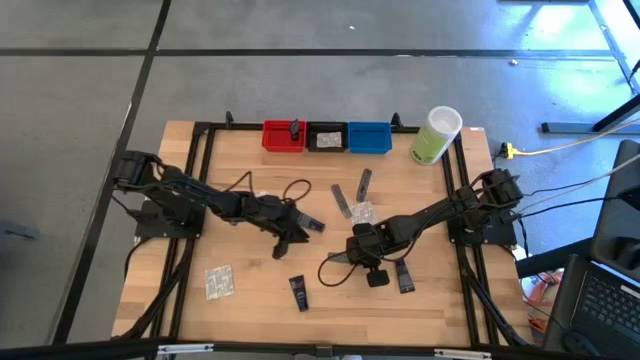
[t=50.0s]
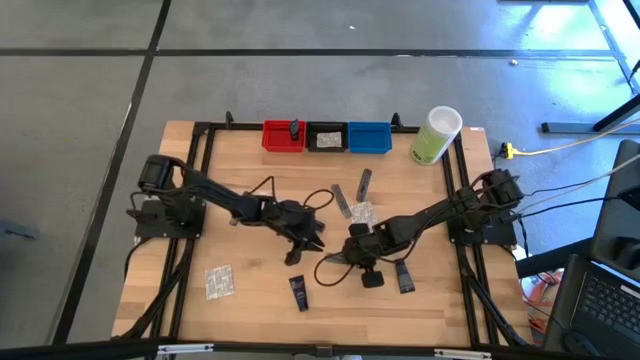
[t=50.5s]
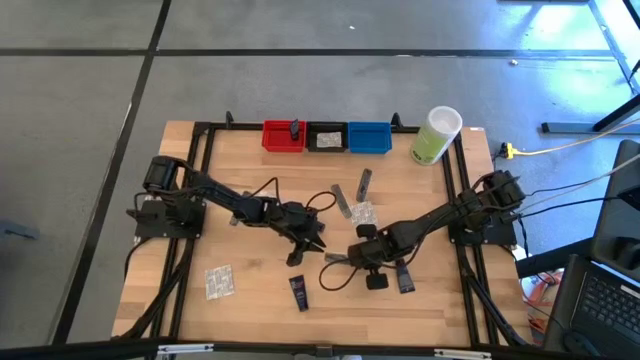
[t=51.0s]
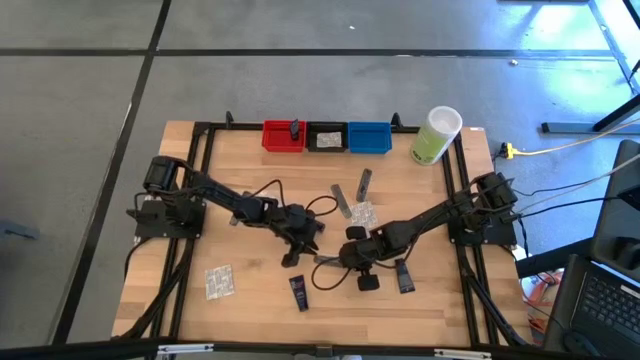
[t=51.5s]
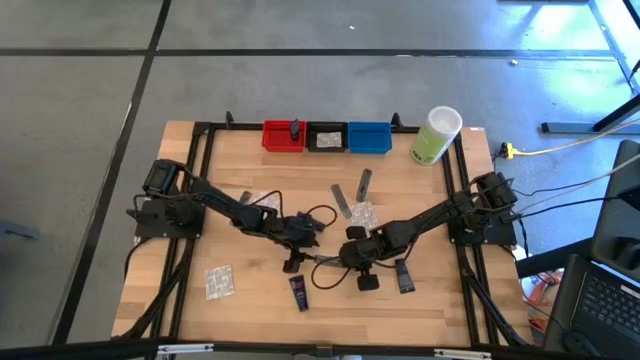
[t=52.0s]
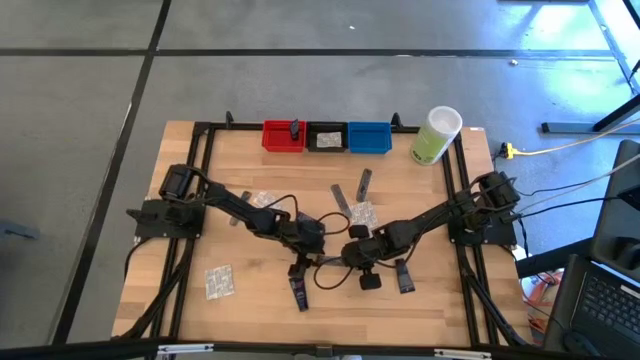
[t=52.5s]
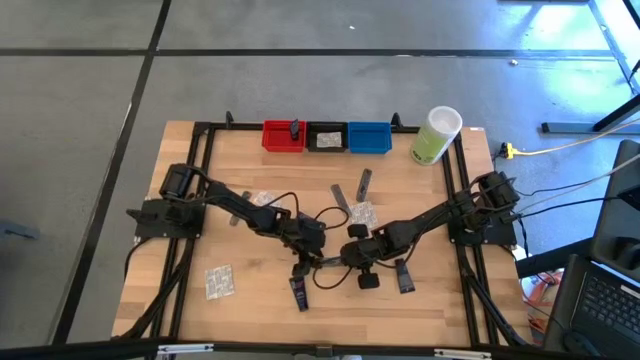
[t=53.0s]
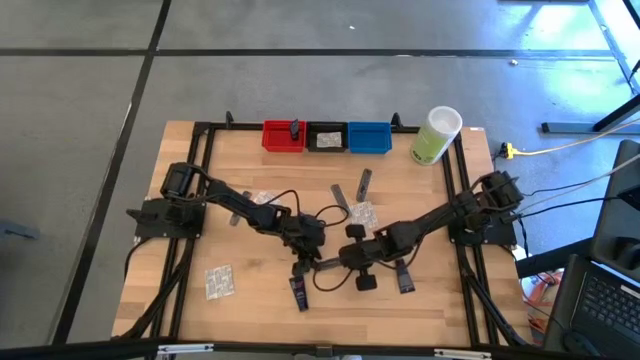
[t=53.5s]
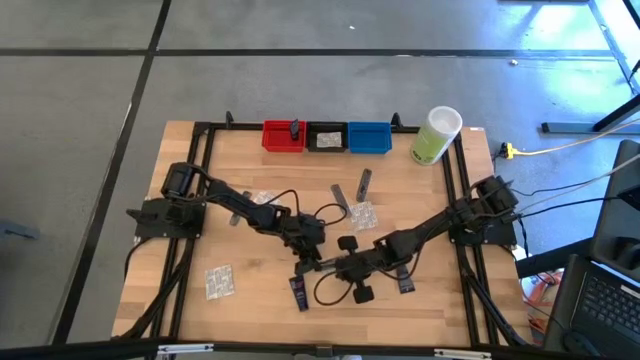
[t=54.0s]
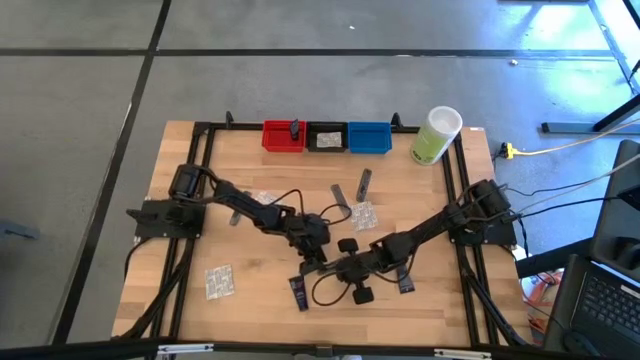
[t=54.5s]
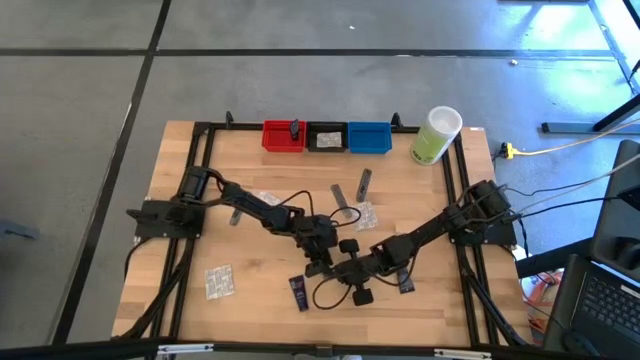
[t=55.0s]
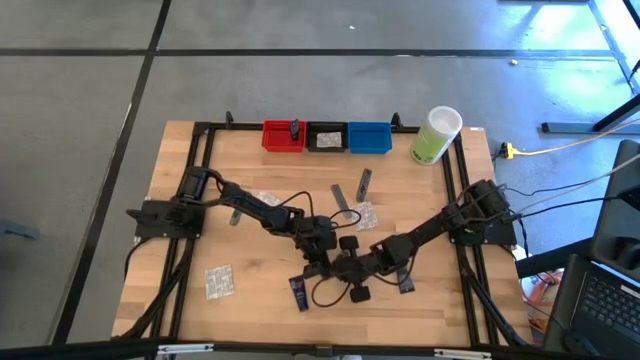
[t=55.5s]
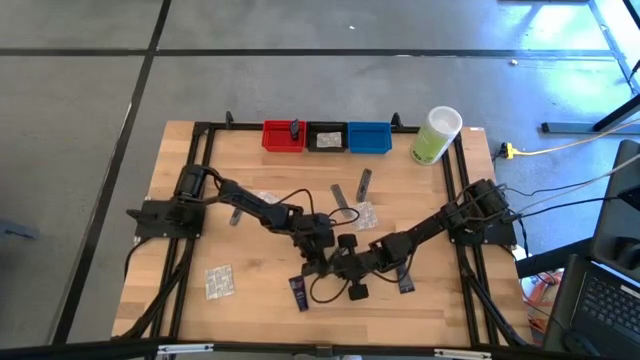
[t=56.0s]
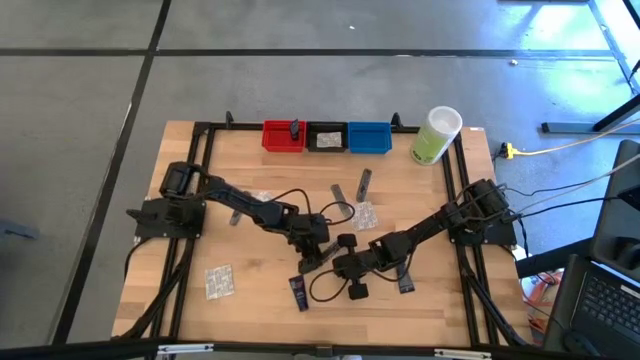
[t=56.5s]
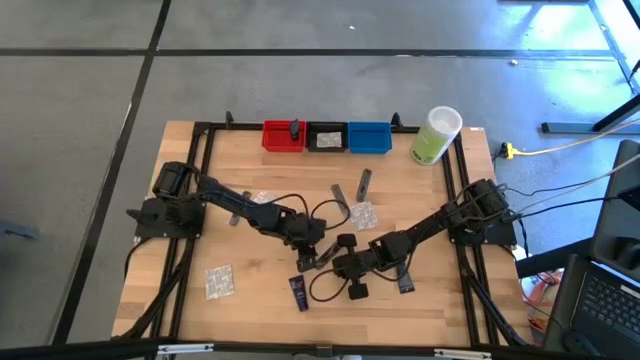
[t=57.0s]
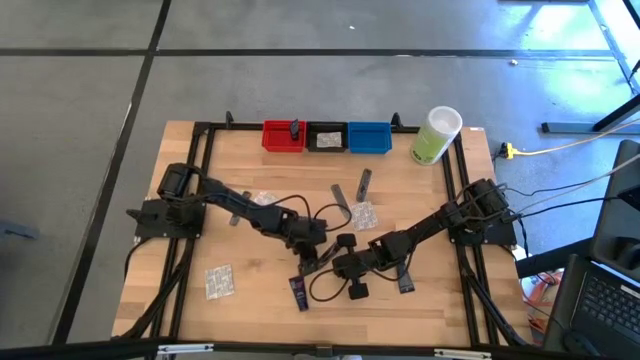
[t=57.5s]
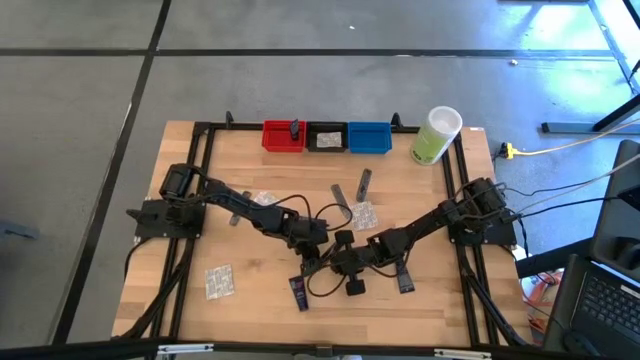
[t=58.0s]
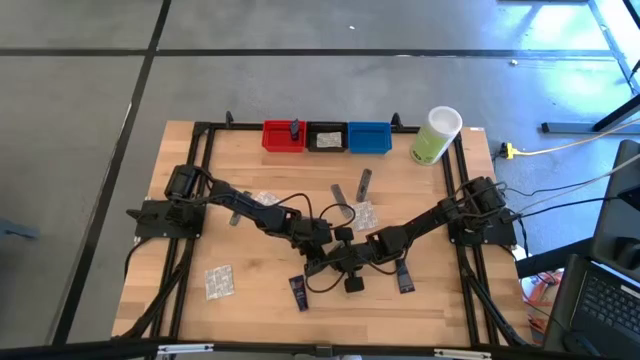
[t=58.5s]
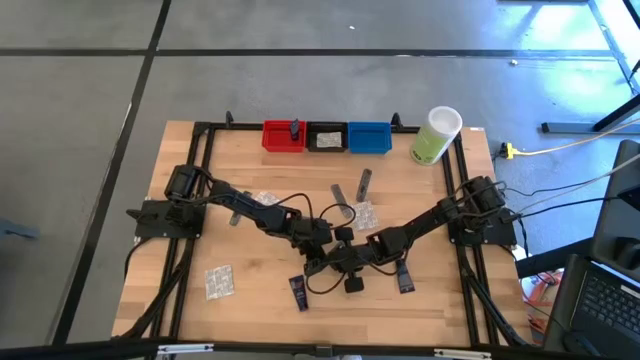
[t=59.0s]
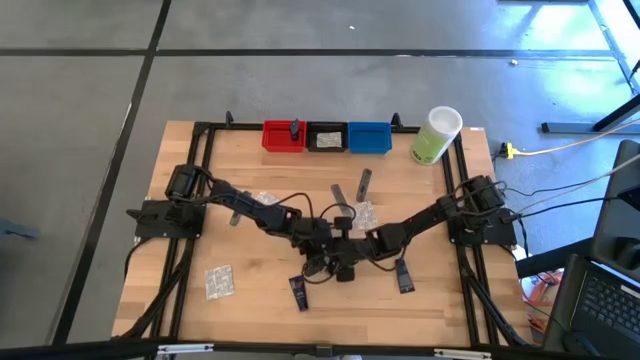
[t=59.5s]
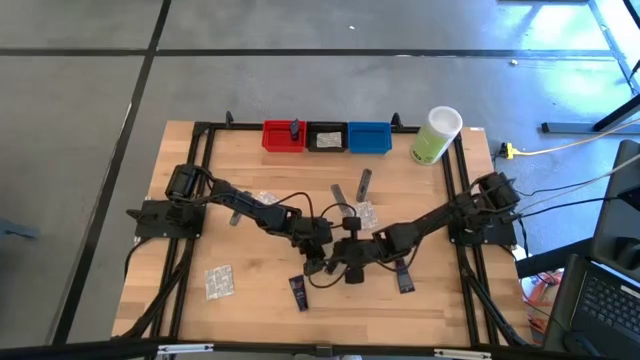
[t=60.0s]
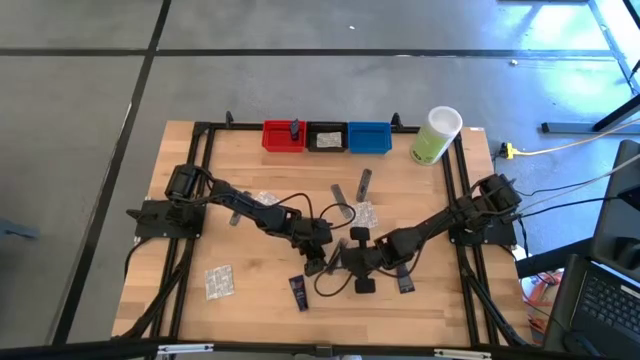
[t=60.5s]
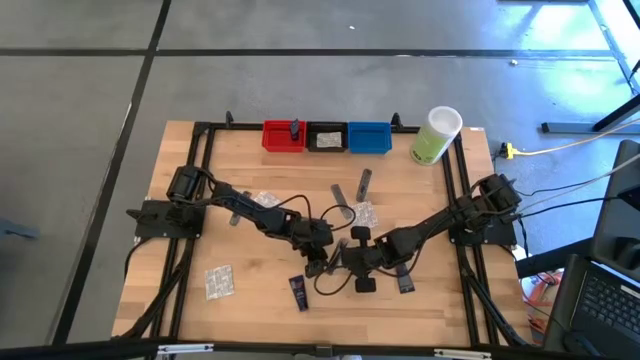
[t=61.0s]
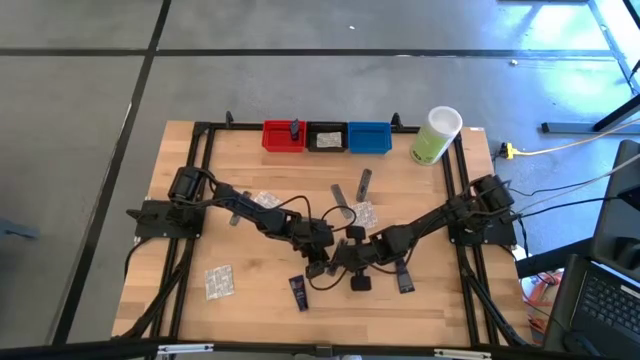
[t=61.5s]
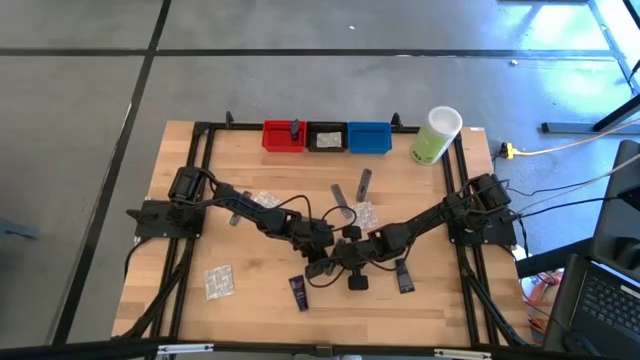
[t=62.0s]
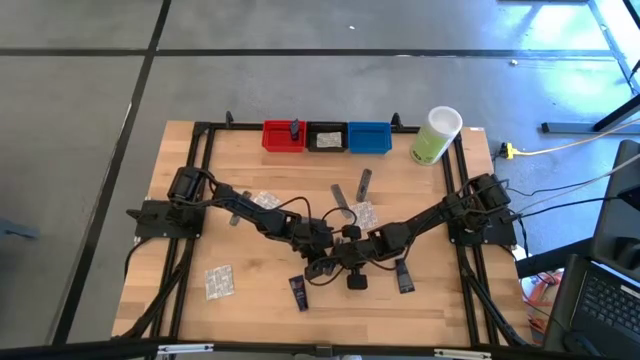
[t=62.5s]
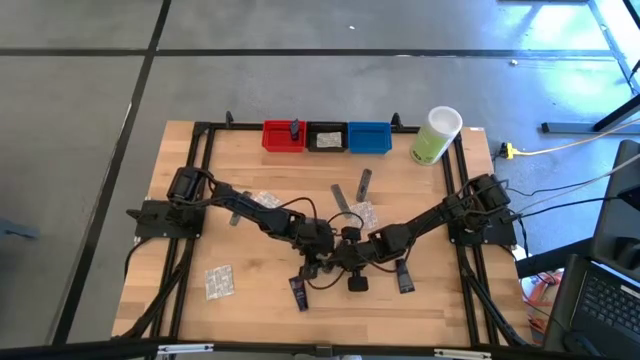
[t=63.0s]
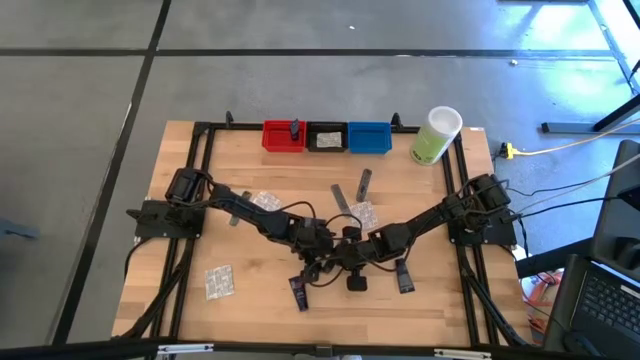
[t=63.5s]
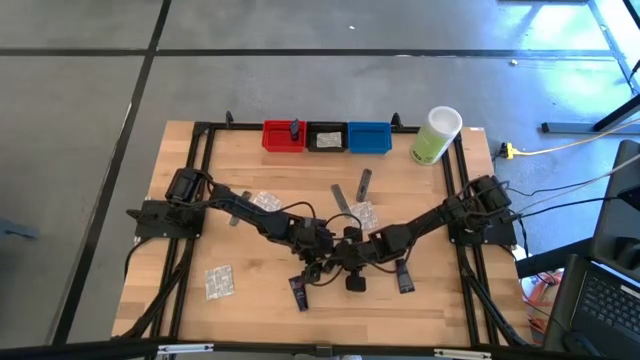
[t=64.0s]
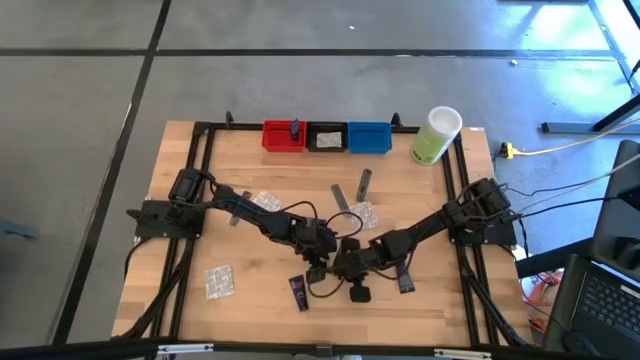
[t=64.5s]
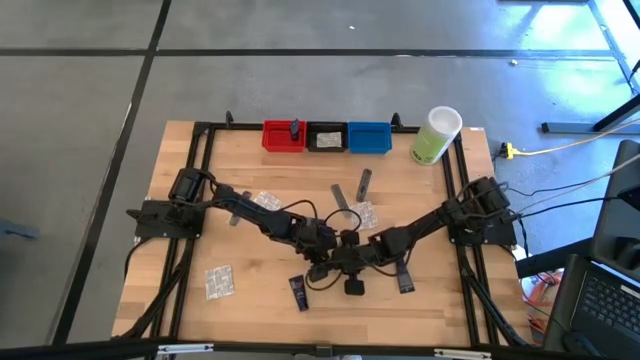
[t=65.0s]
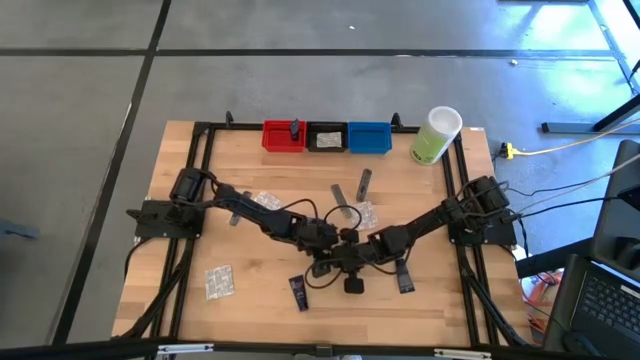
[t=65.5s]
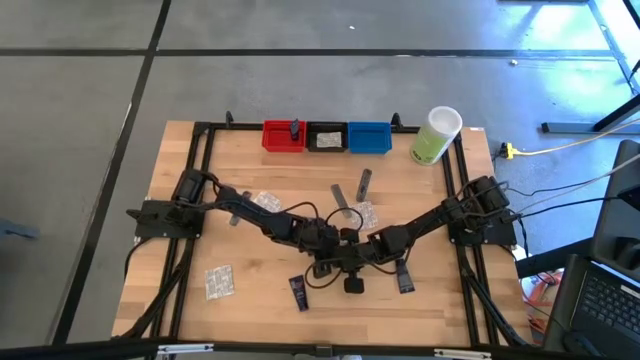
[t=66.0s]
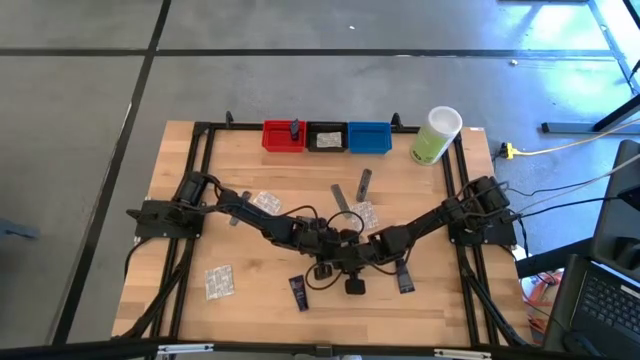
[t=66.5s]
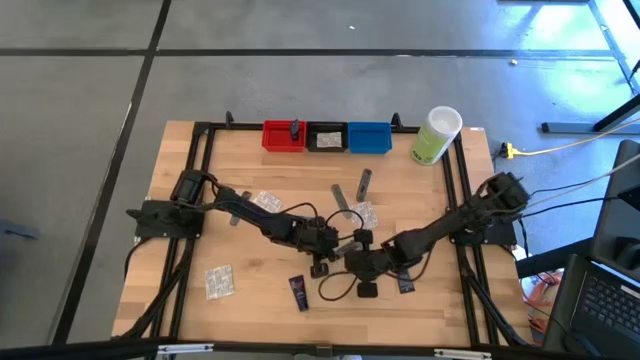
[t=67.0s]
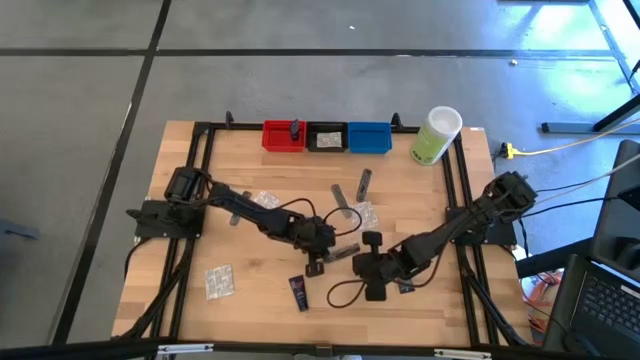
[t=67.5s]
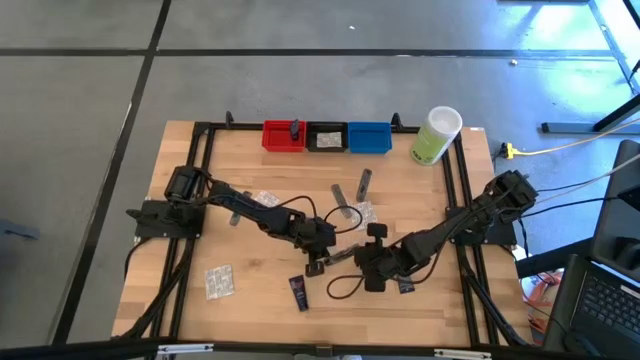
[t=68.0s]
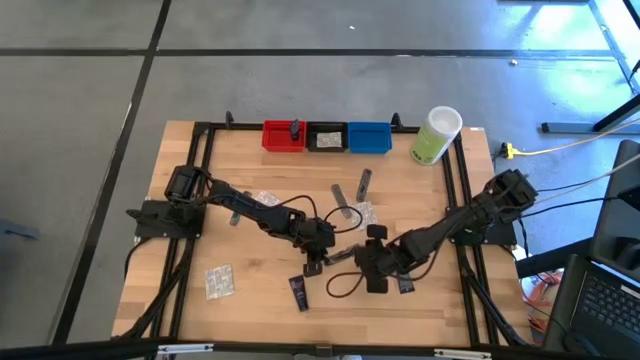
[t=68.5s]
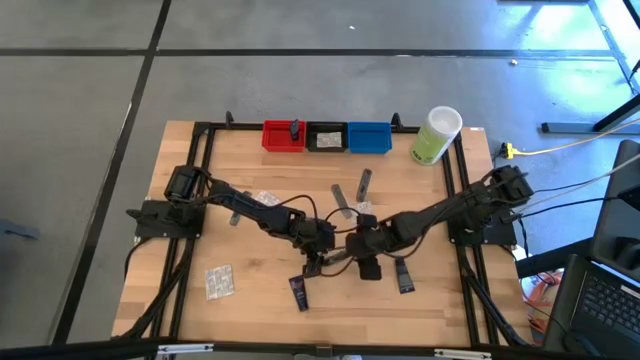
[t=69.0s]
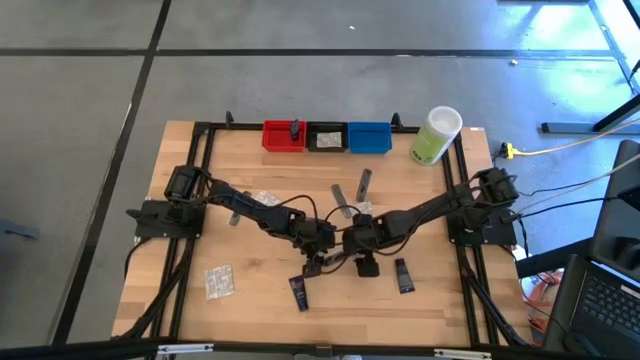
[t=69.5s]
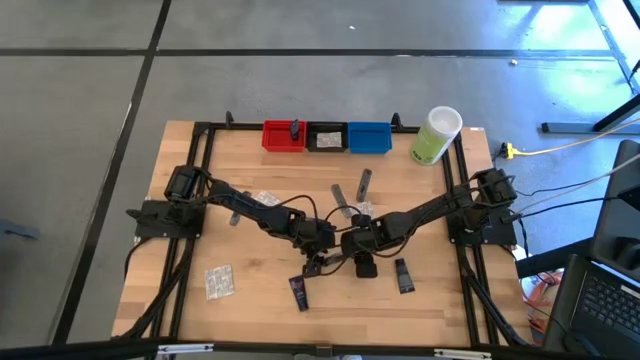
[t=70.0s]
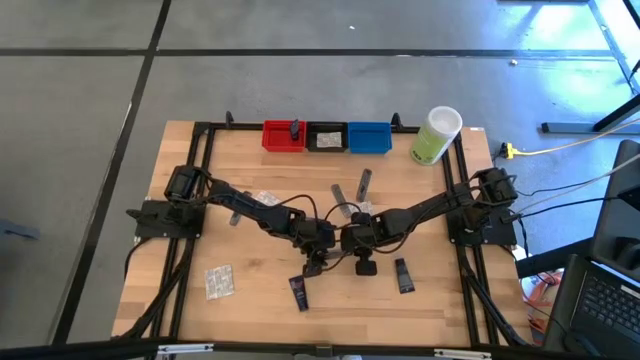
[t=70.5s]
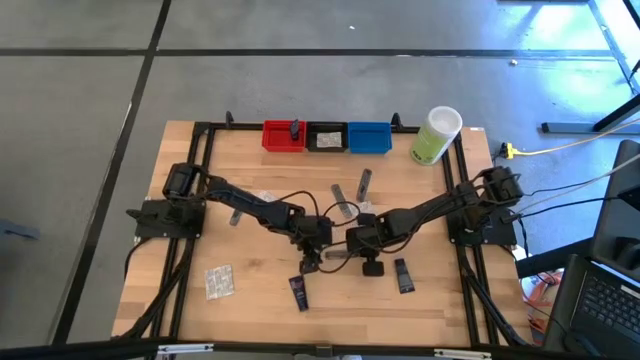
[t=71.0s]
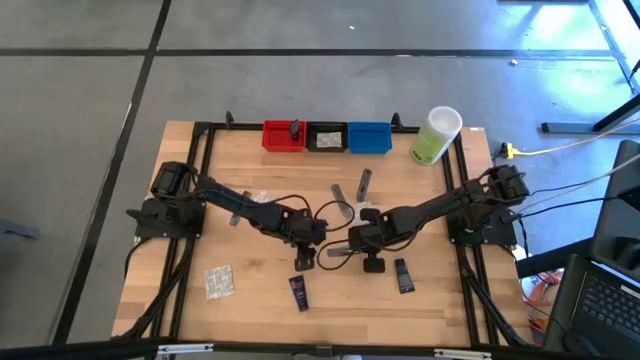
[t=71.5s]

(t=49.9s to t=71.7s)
Task: Pick & Place Travel size toiletries
Put the black comb into the blue bin
